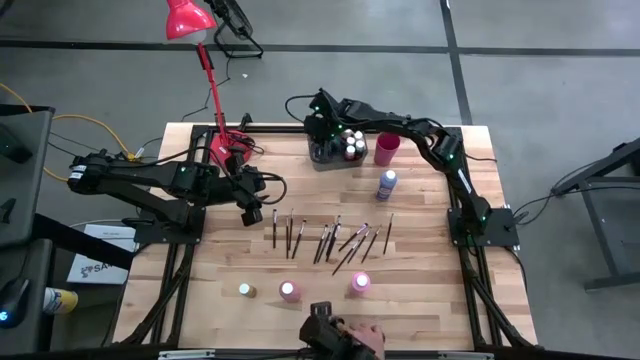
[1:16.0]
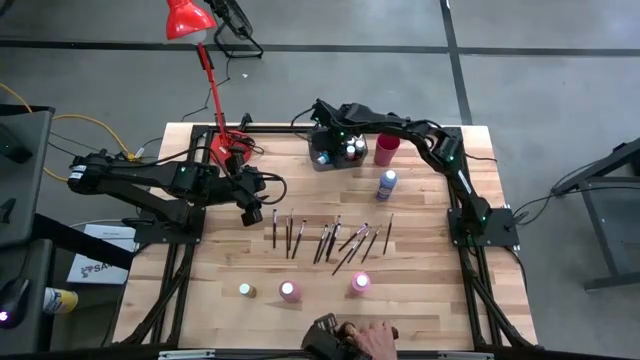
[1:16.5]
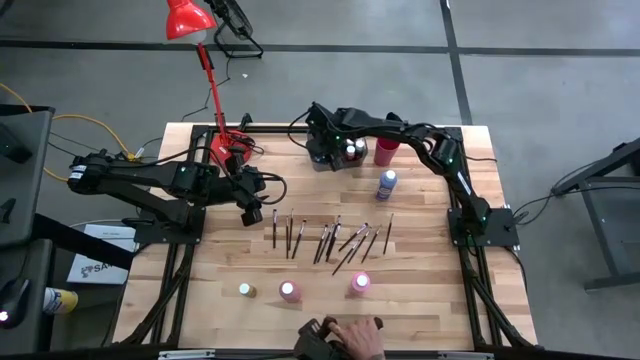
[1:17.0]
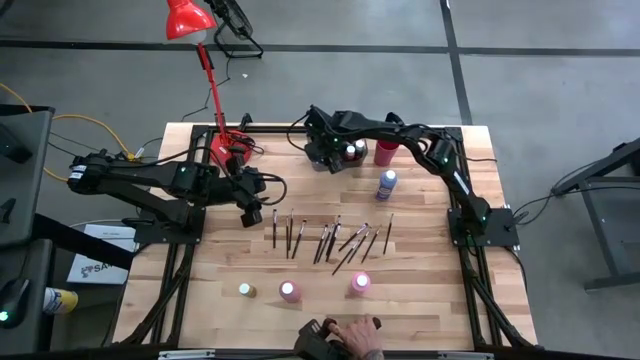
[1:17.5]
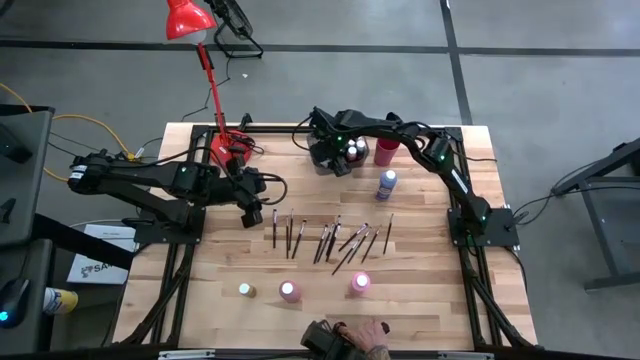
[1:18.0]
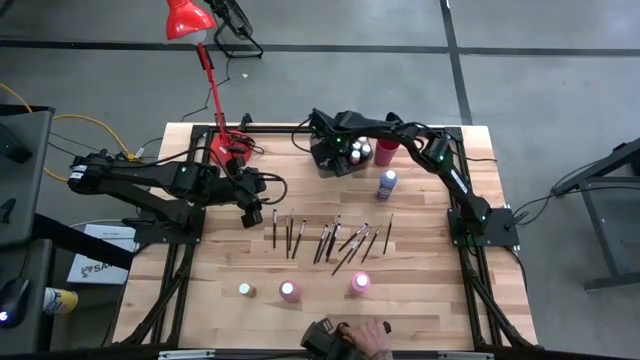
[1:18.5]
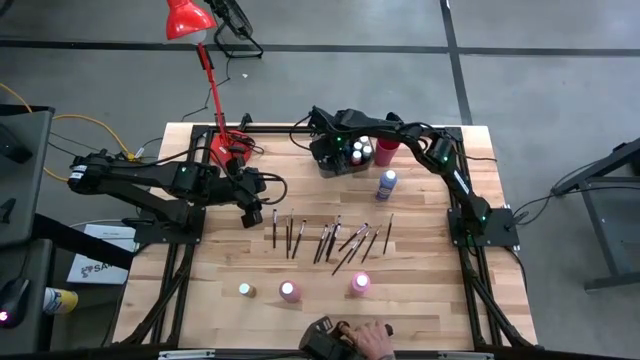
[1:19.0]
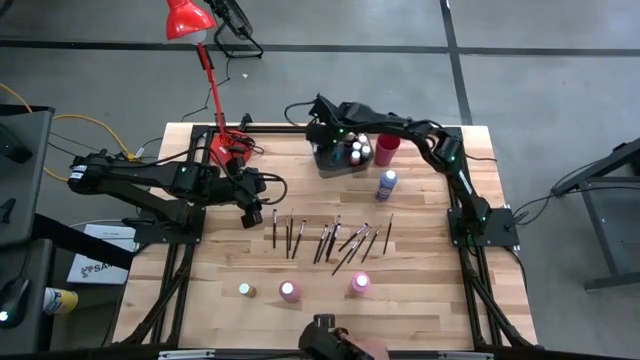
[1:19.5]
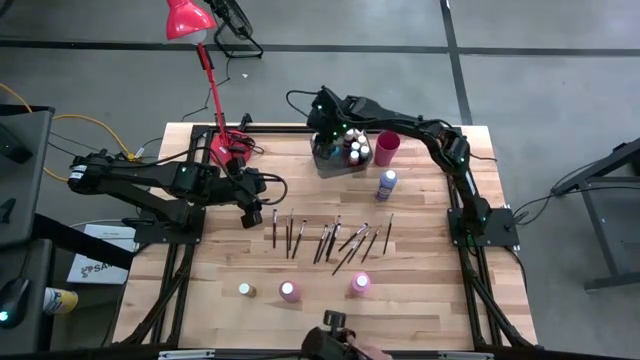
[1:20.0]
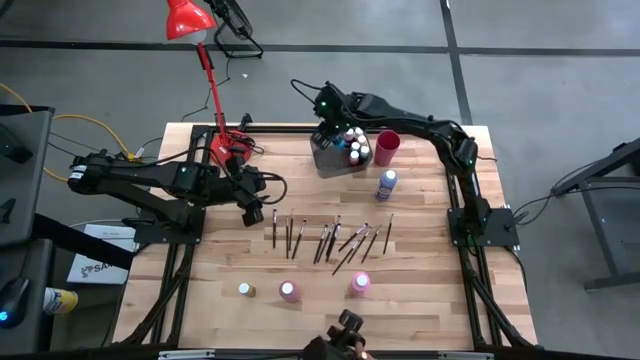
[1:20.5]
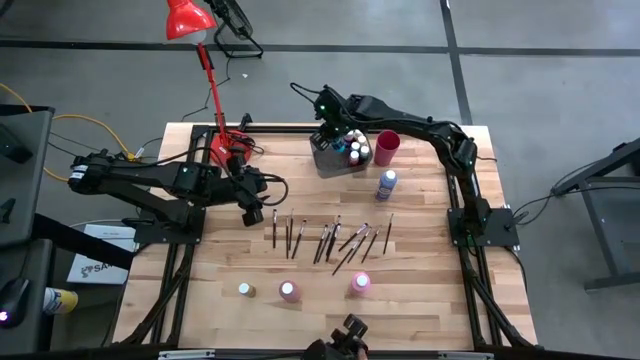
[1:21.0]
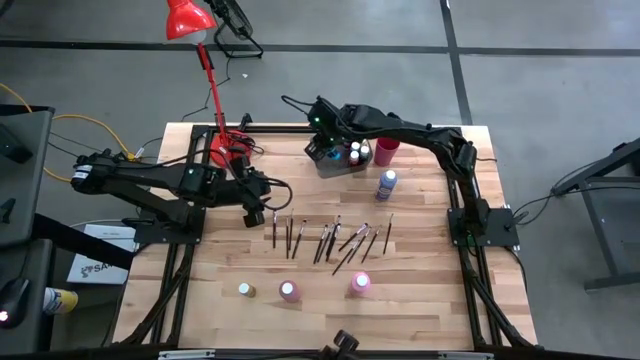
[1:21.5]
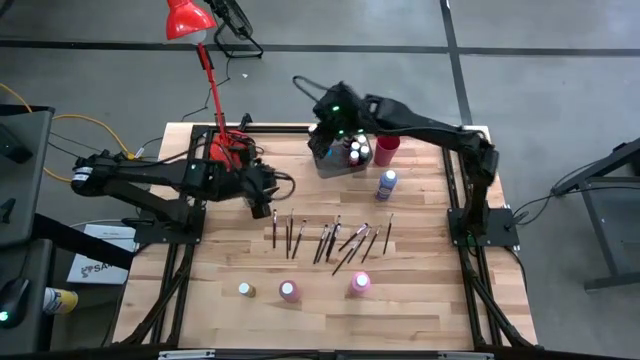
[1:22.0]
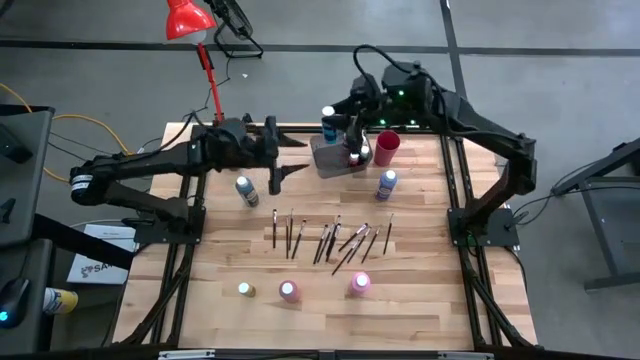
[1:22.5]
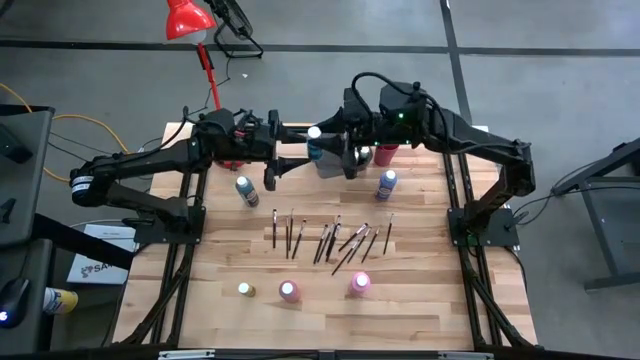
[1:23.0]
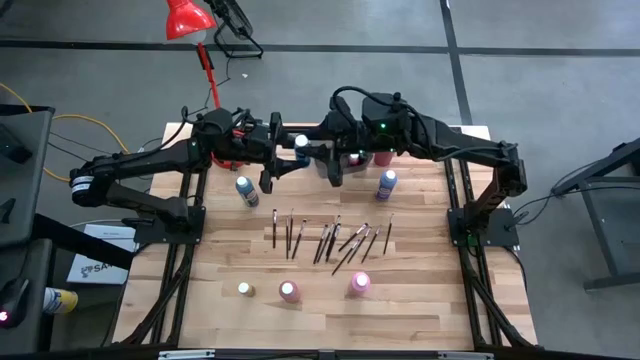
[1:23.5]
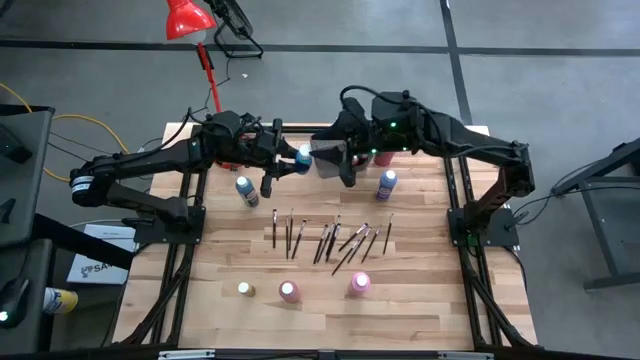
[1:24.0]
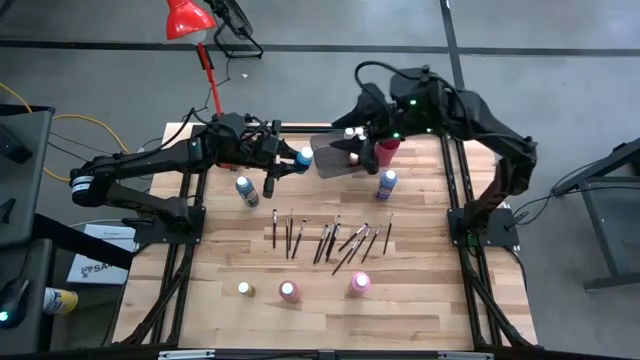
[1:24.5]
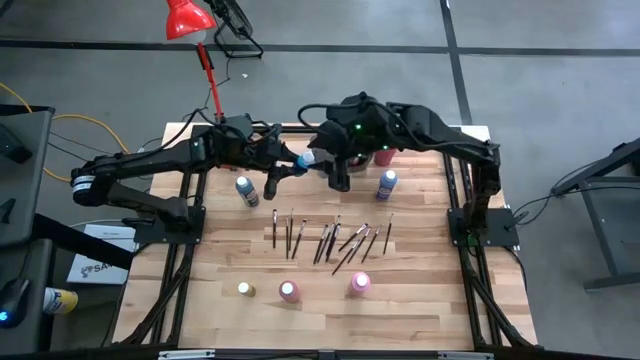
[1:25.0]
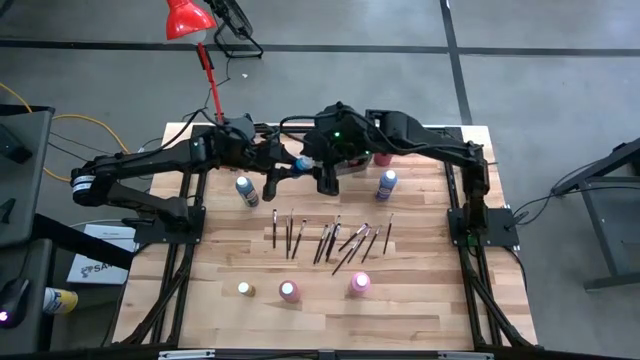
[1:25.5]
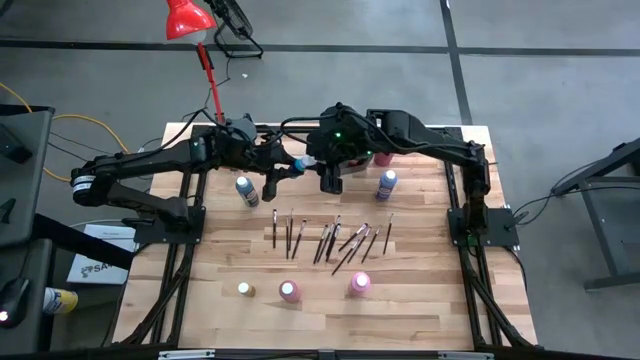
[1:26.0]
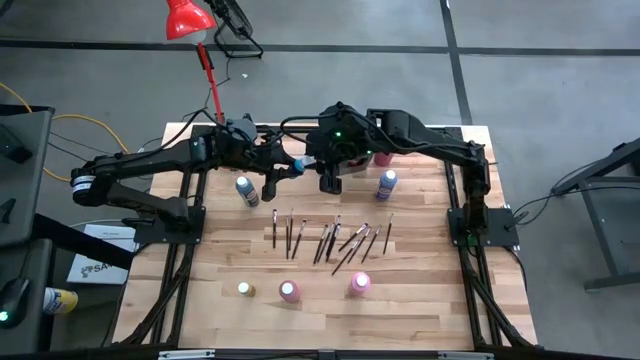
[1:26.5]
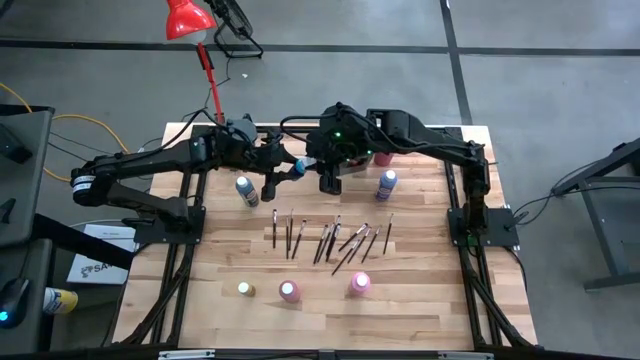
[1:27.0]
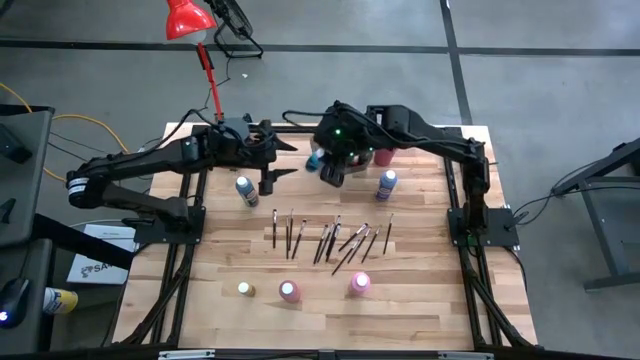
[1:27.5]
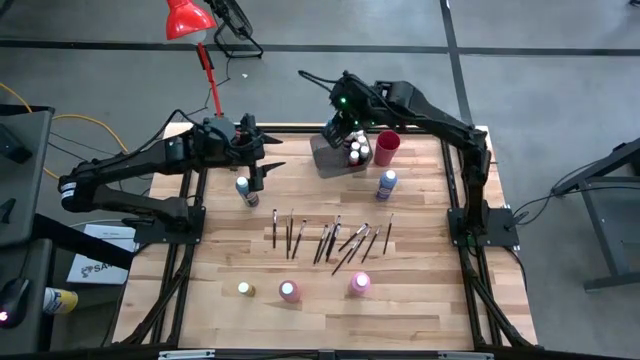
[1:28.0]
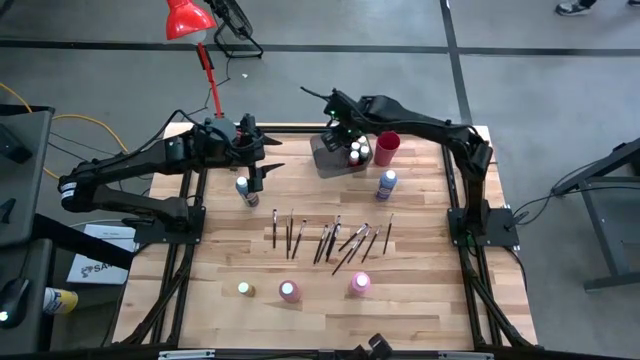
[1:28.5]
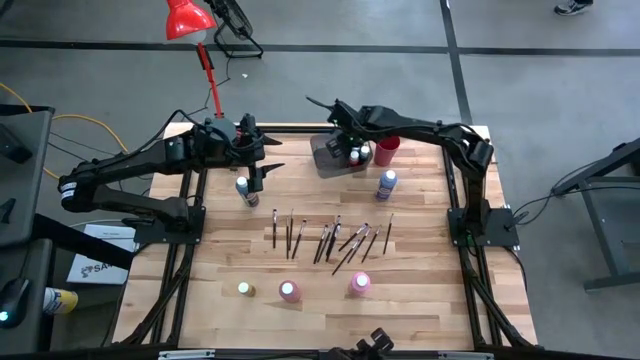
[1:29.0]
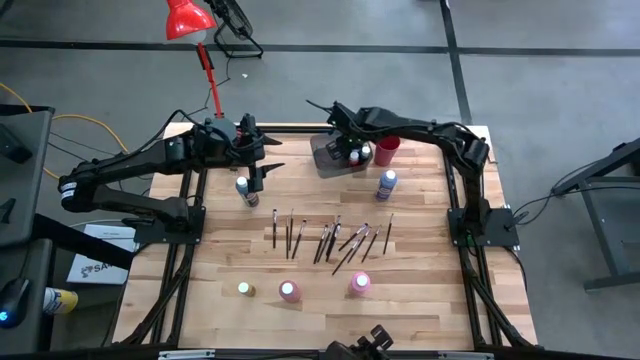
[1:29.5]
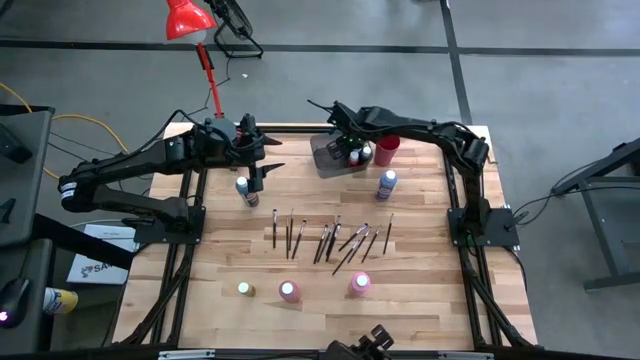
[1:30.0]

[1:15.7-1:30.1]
Task: Pick & Place Paint Supplies
Put the small light blue paint bottle into the black bin

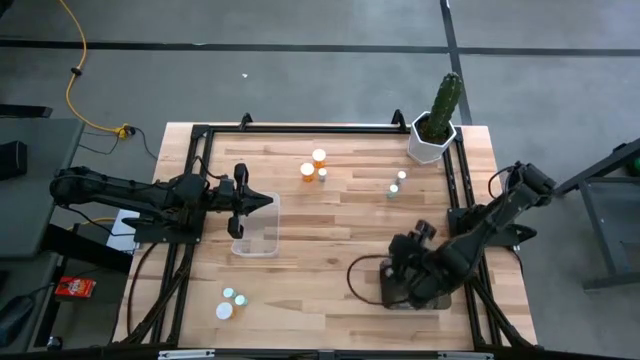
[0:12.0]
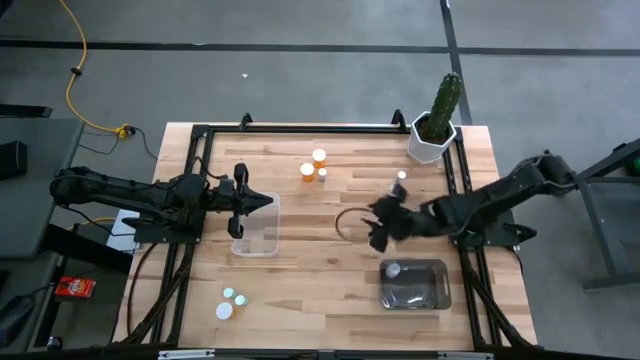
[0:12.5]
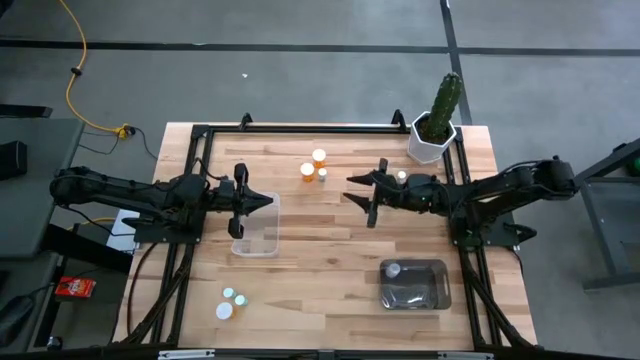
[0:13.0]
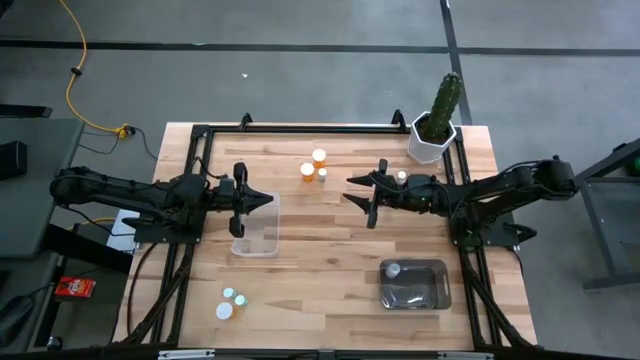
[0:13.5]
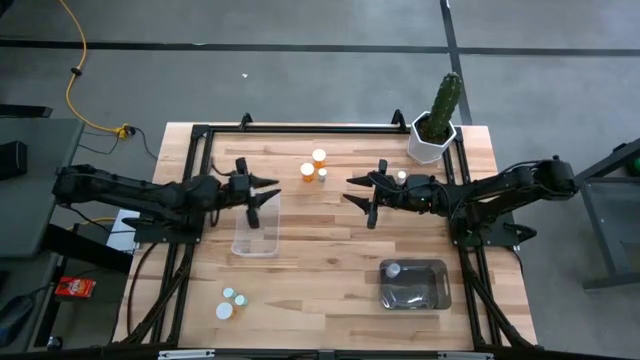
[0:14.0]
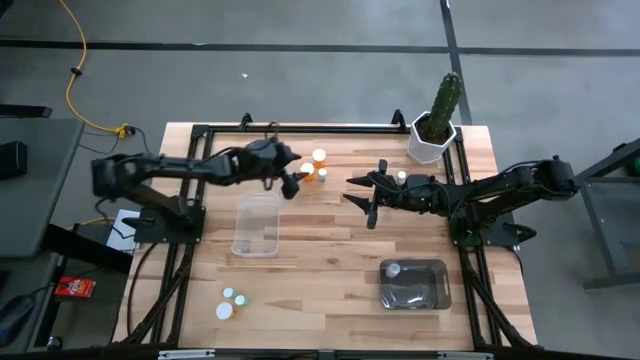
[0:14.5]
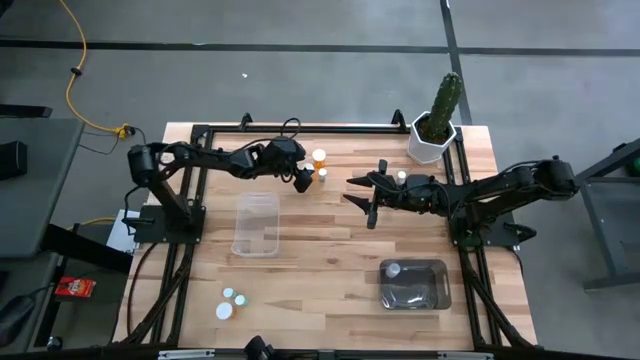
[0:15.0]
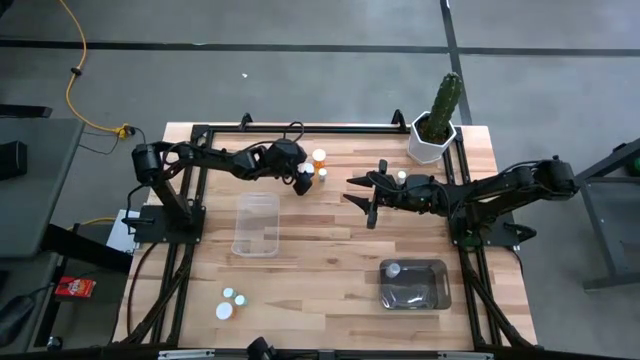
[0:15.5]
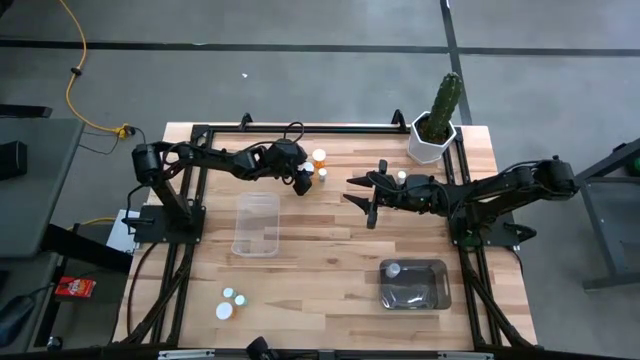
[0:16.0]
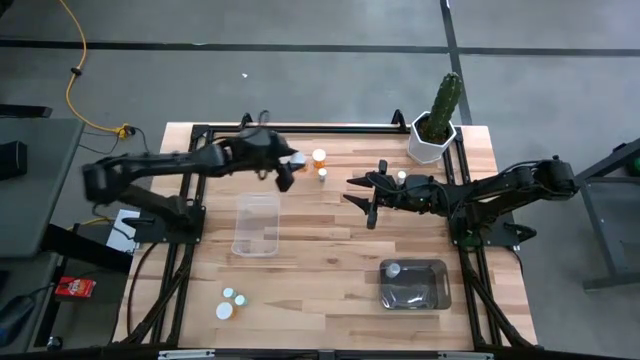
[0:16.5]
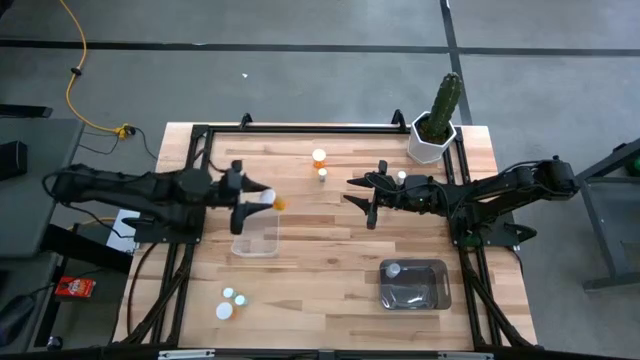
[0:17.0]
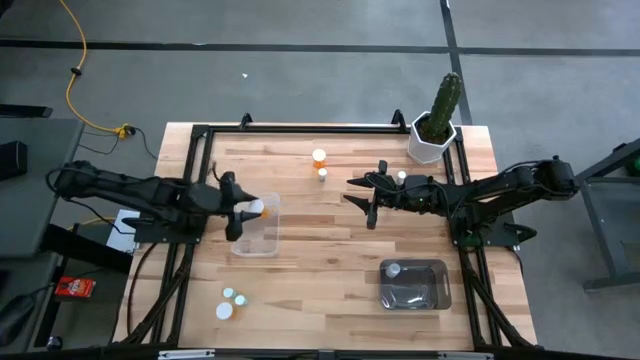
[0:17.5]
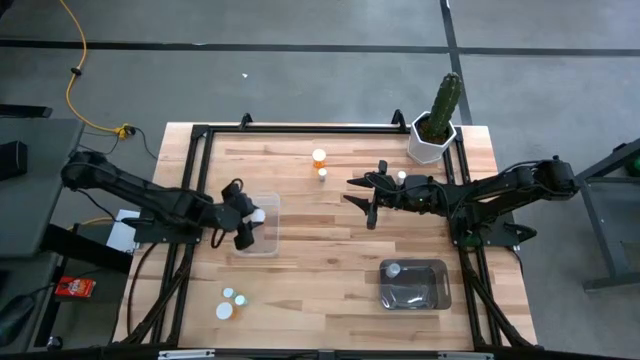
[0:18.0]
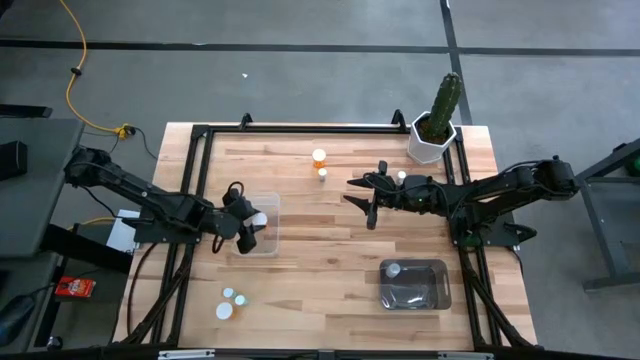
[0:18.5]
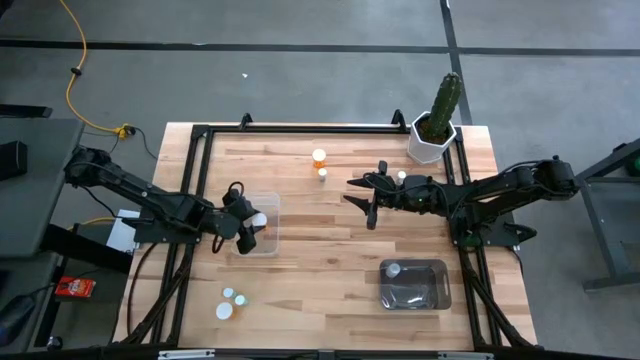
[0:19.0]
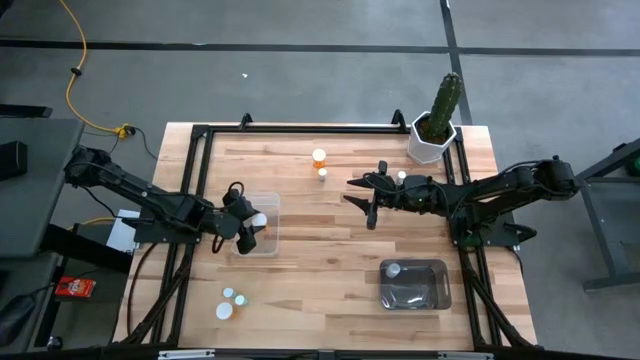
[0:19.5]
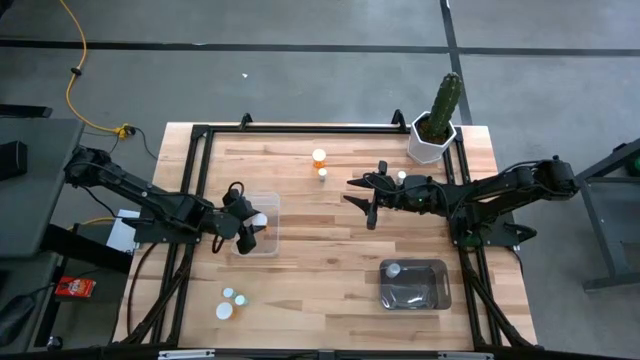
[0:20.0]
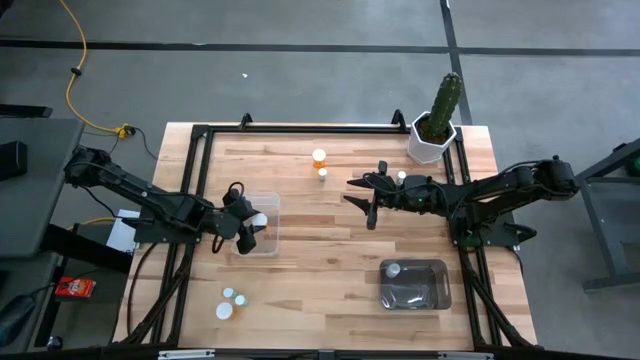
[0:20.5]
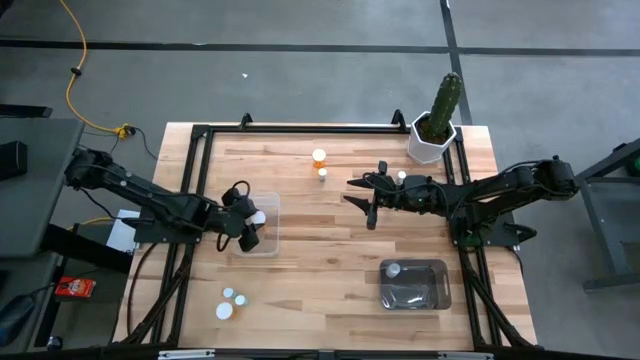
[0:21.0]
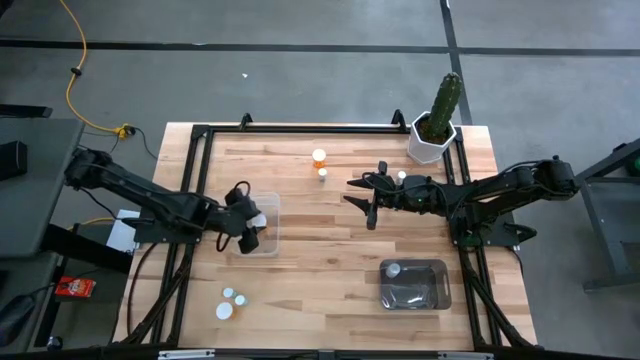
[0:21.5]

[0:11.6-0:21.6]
Task: Pick and place medicine bottles into bin by pill shape (circle, oval)
Put the top orange capsule bottle into the transparent bin
